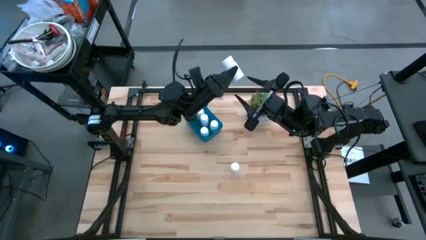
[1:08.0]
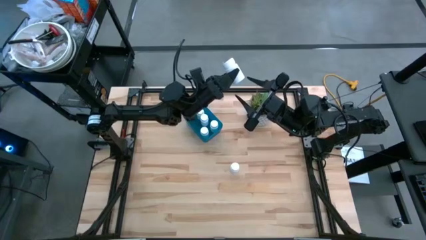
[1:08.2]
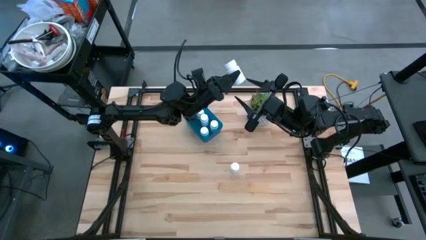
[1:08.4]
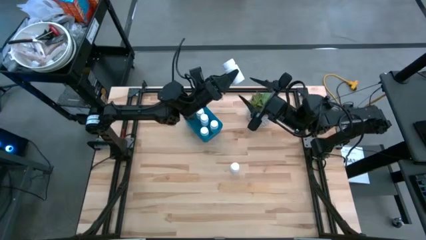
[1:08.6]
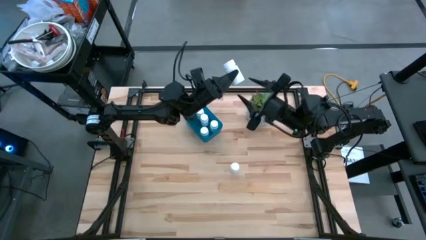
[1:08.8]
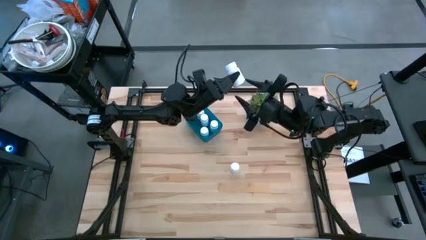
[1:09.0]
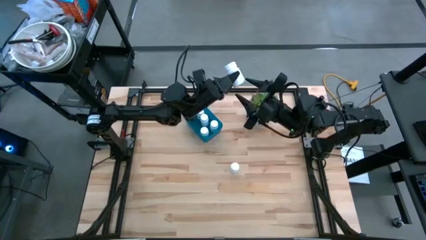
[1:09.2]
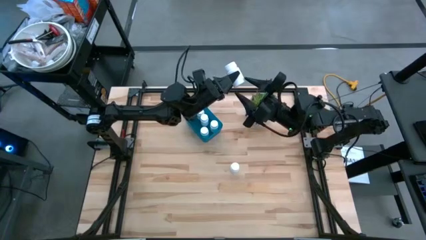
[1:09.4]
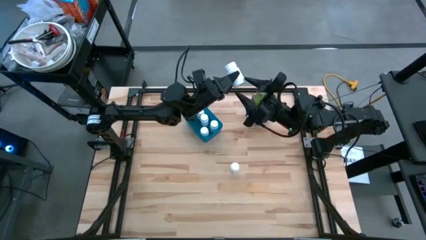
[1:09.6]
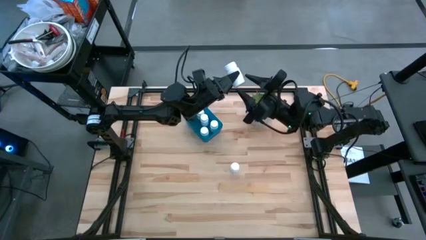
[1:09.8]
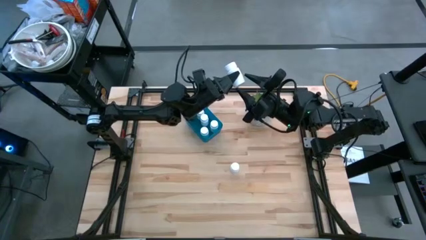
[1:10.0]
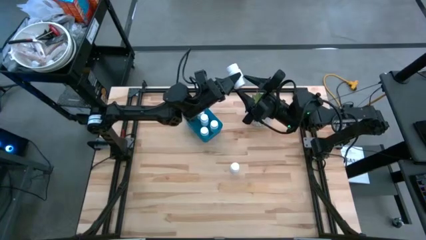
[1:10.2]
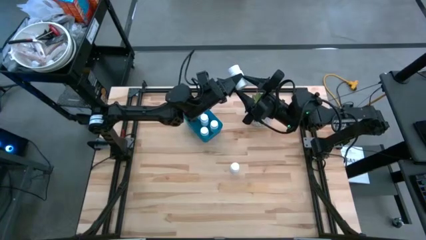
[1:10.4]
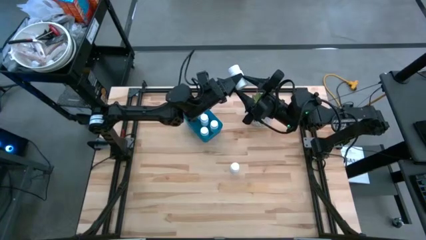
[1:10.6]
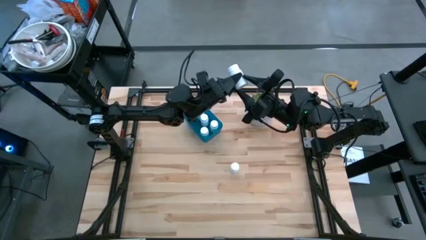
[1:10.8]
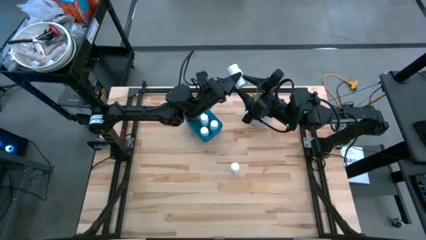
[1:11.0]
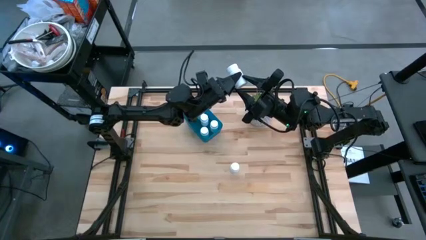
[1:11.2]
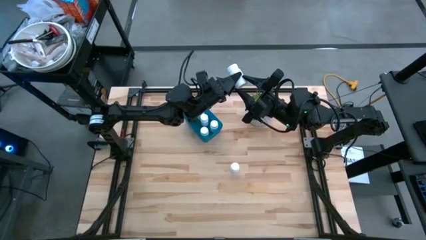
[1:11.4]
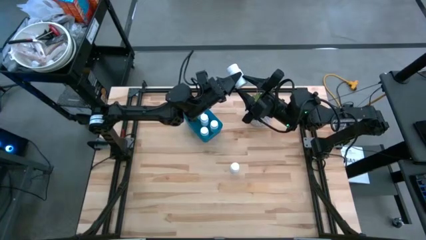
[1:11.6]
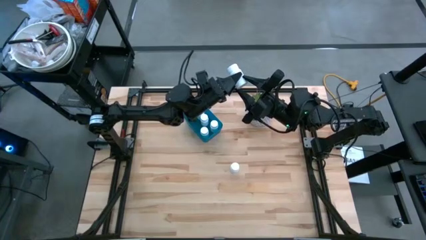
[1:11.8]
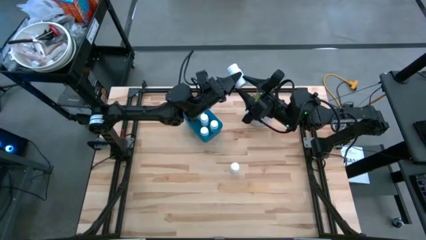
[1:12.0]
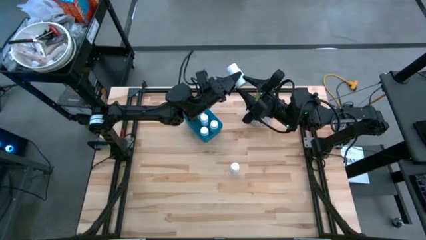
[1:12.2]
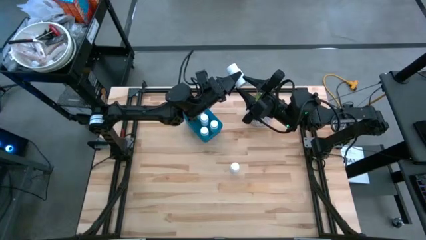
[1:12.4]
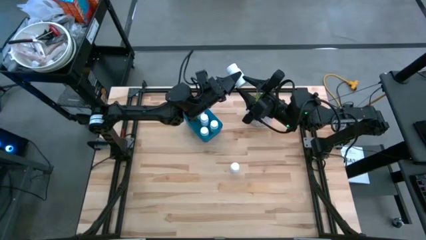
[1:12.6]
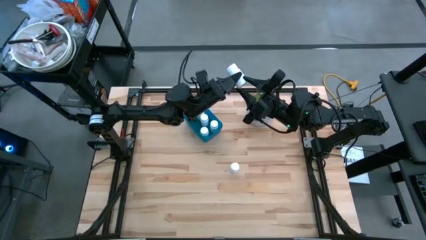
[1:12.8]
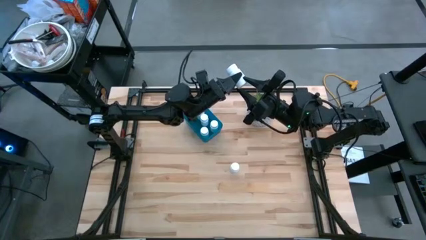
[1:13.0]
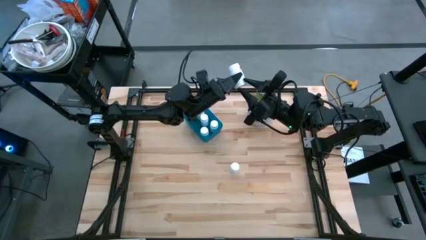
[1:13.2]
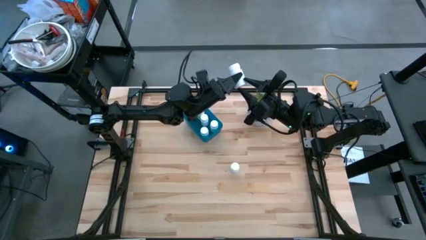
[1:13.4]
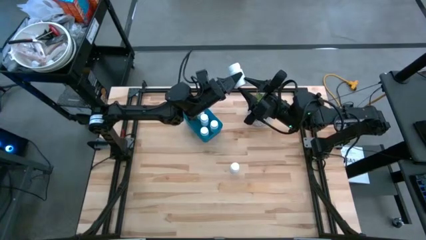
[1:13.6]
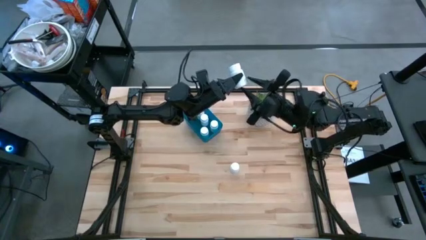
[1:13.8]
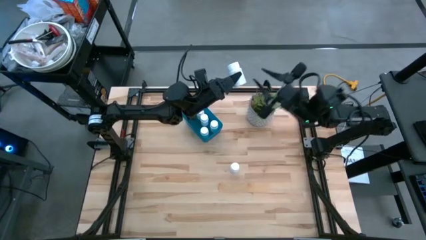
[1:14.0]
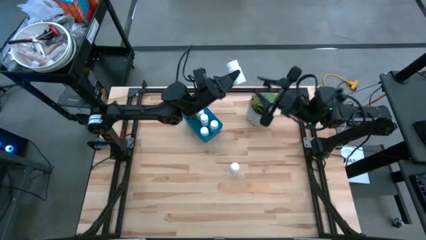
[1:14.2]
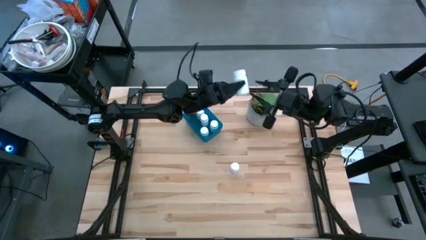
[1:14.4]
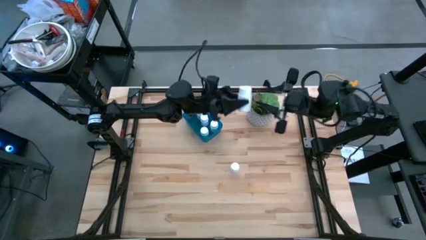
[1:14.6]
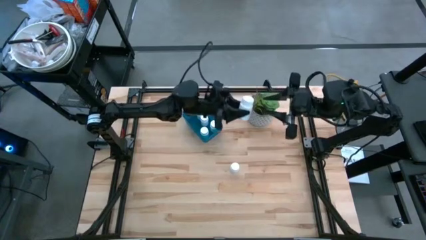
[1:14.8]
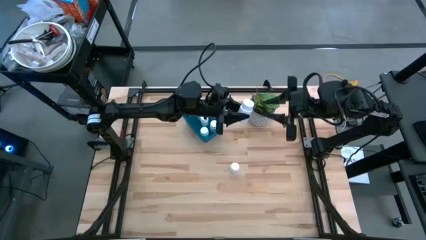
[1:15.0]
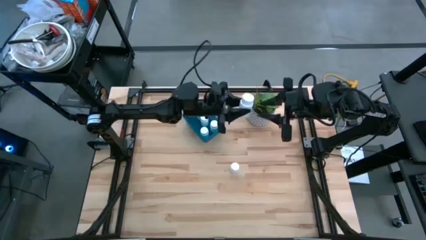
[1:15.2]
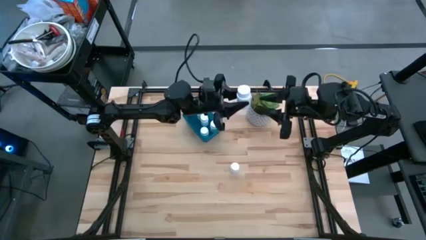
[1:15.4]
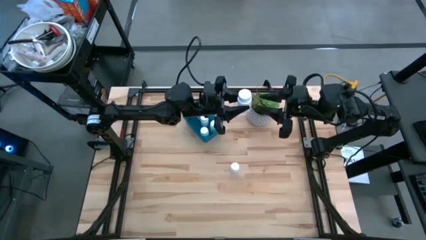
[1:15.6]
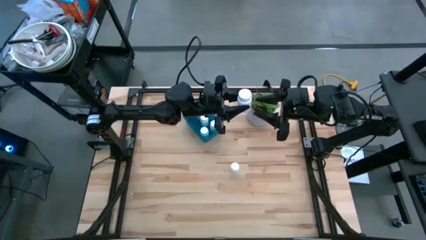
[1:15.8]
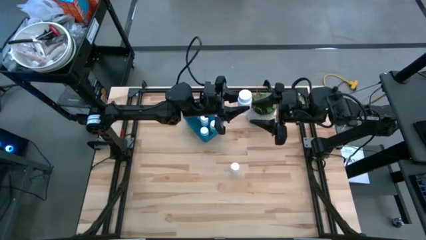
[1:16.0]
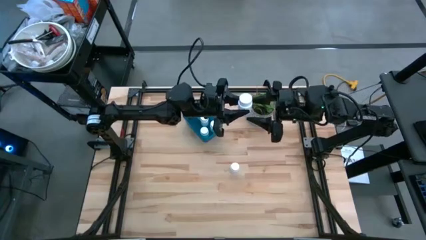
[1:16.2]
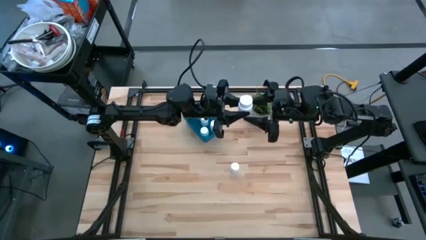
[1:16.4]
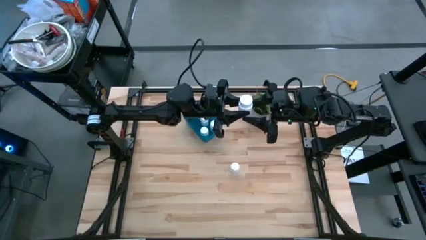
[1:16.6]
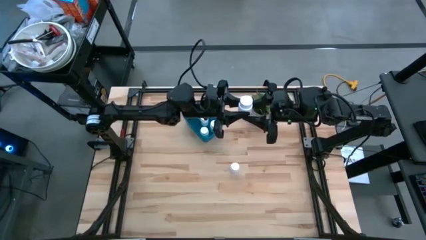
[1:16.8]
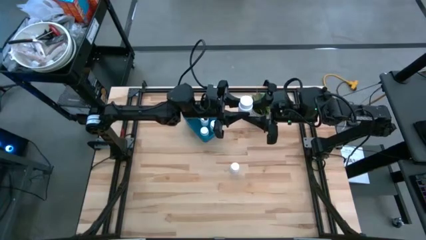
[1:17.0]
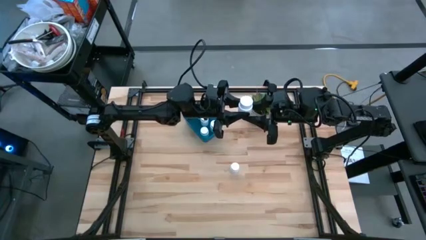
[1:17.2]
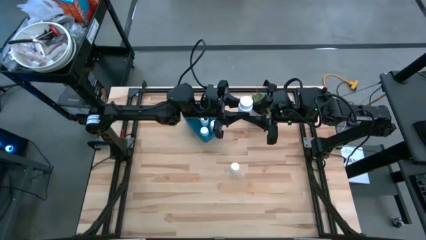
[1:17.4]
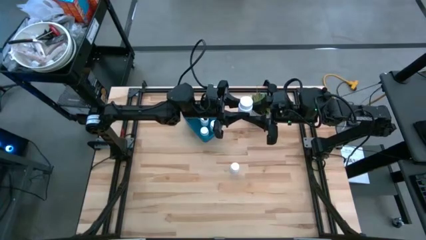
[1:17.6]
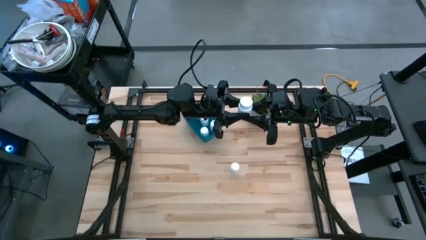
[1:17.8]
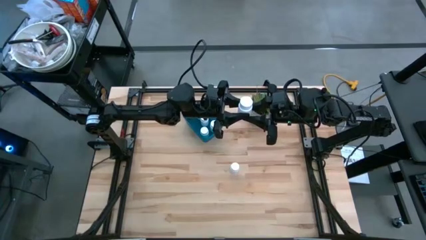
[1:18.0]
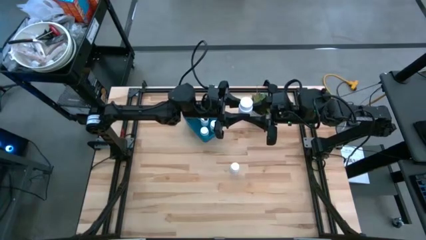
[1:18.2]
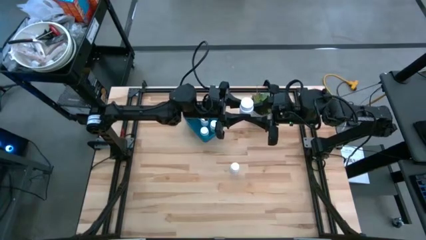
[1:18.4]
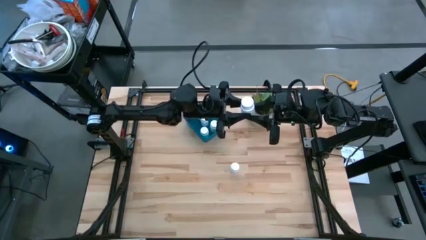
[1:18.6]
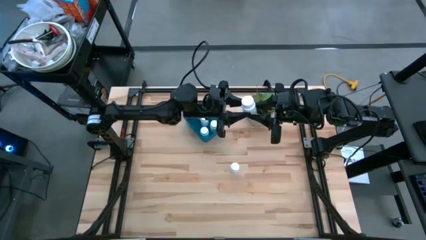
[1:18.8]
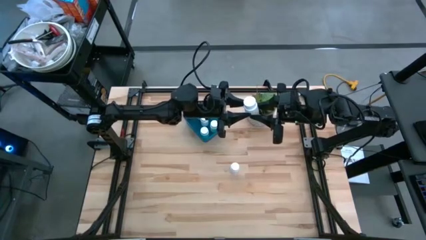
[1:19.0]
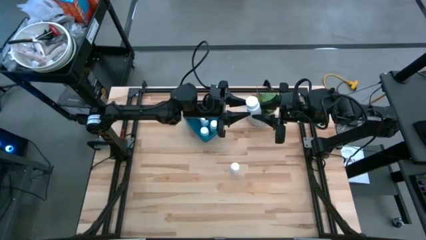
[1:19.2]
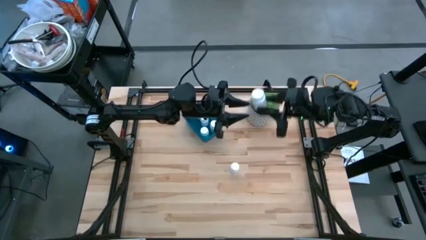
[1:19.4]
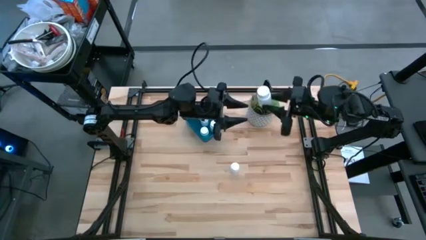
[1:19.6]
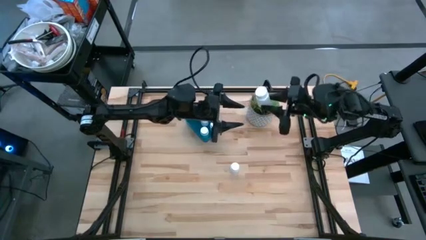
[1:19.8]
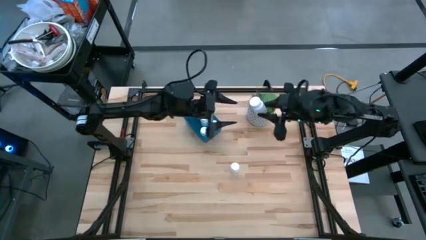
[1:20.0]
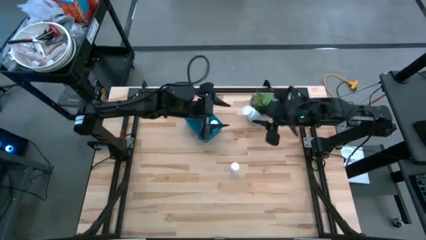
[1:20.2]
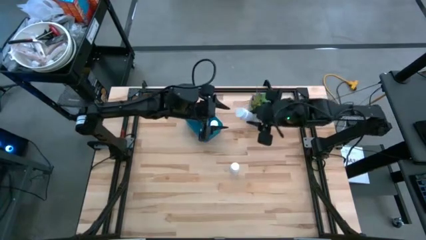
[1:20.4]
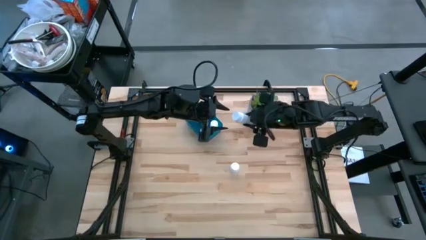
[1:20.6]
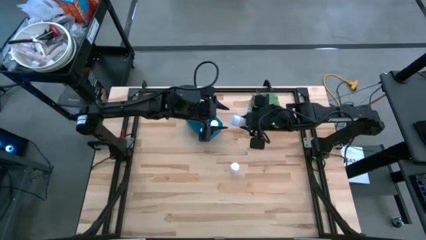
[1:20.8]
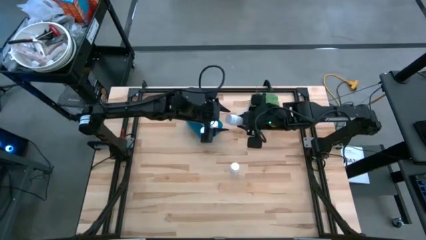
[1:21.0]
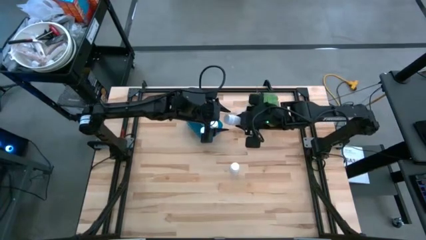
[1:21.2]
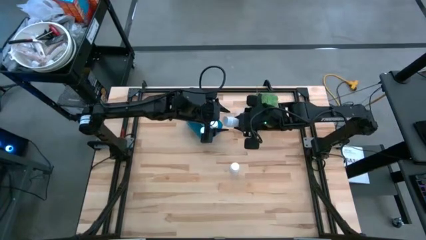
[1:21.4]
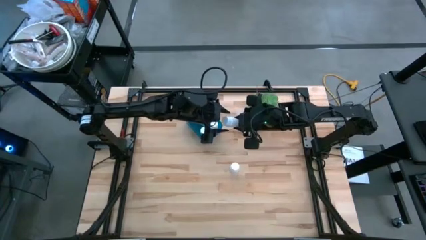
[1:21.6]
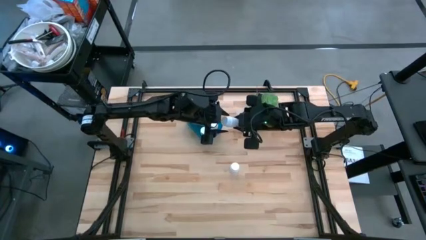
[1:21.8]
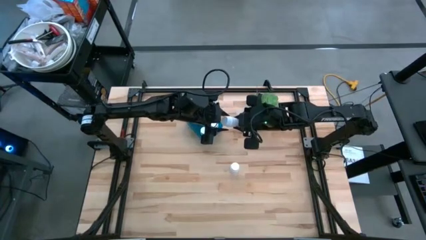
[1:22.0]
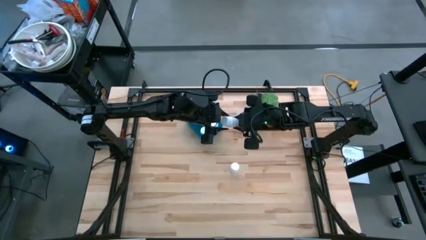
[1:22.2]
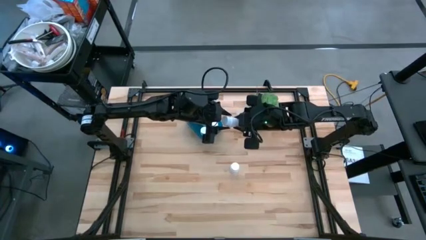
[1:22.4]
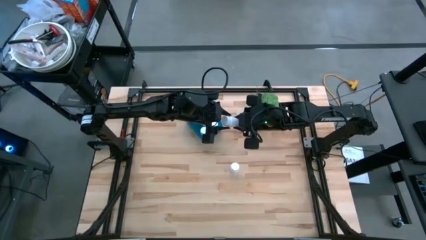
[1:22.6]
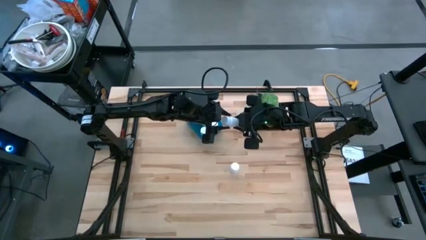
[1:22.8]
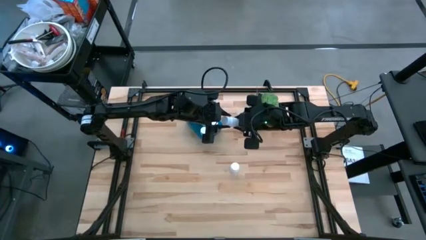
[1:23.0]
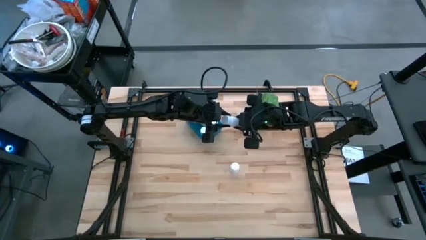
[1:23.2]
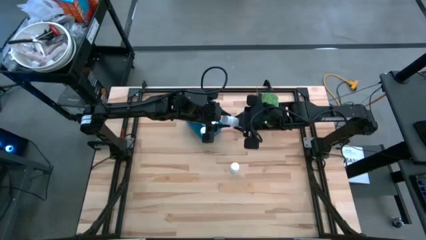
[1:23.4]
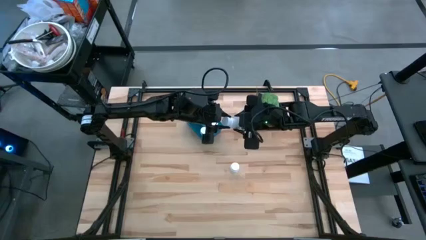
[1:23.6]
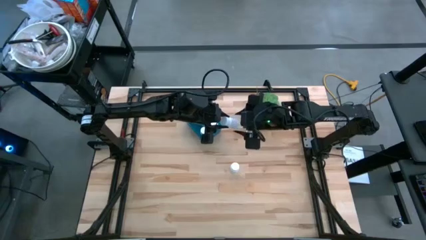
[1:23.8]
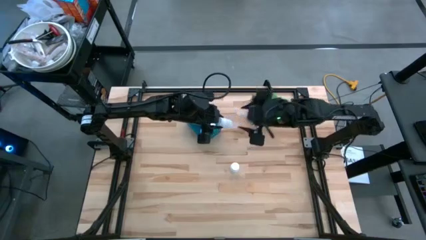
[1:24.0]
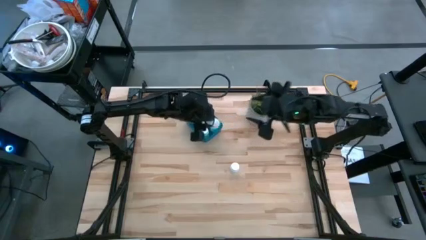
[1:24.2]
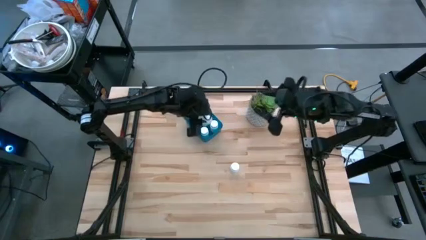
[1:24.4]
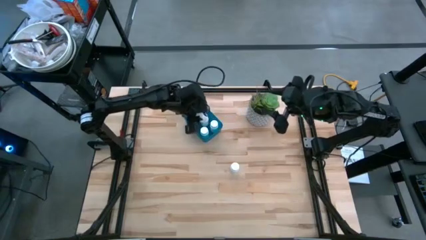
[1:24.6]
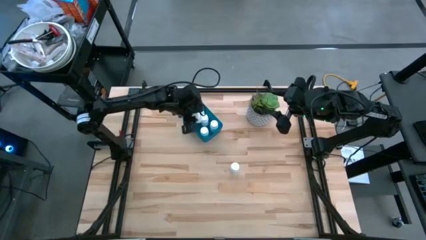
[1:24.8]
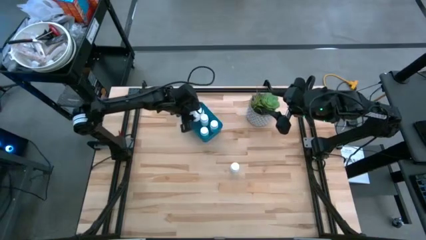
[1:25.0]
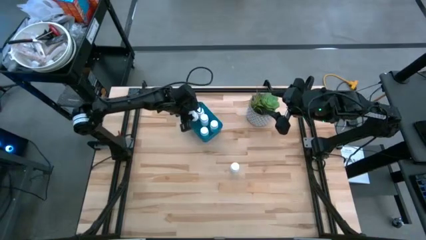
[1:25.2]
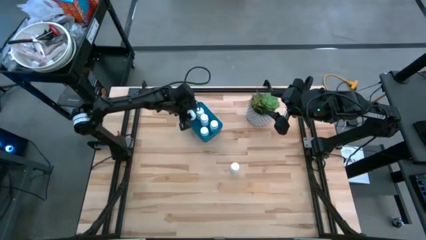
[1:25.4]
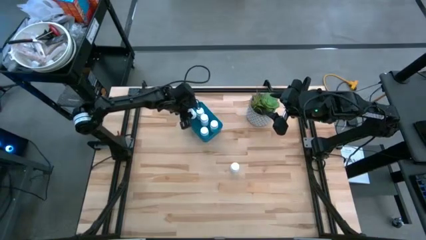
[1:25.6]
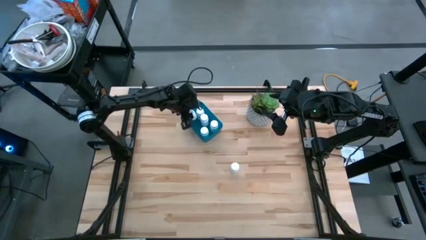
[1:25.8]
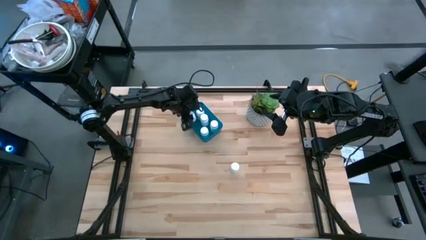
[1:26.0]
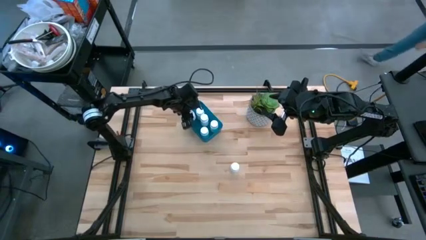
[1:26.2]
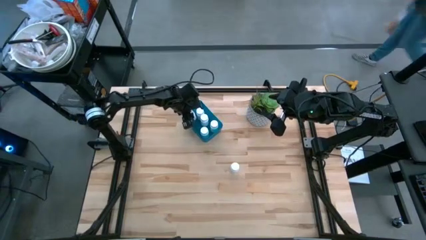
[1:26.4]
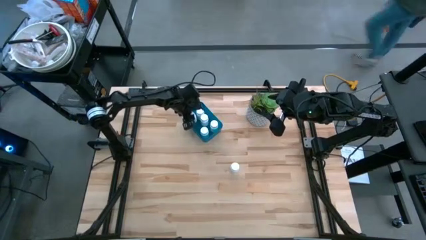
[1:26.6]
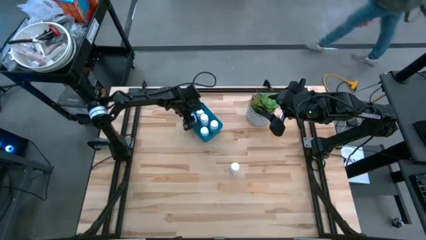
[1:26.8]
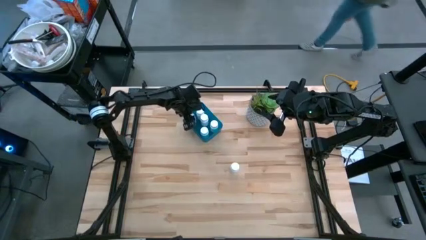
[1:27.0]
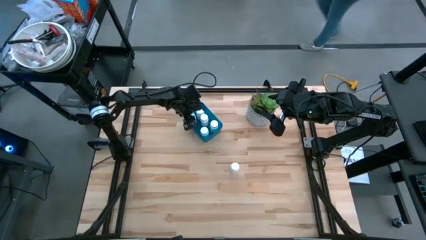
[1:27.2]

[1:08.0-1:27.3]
Task: Pick and place pill bottles into a basket
Put the white pill bottle into the dark blue bin
